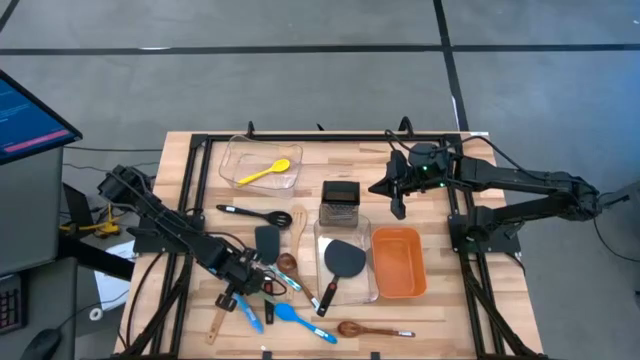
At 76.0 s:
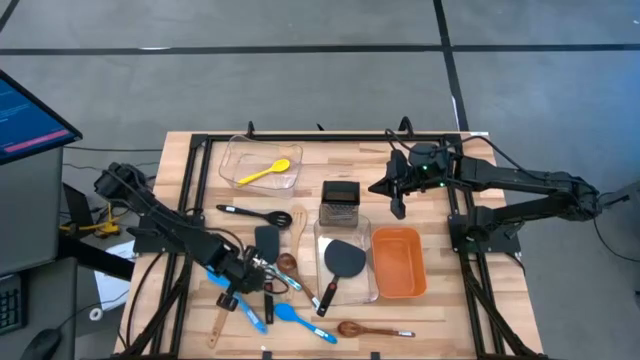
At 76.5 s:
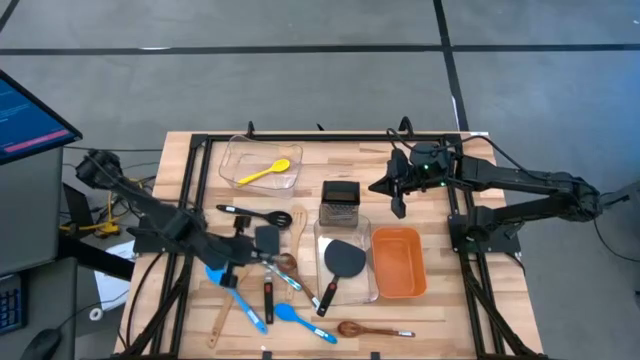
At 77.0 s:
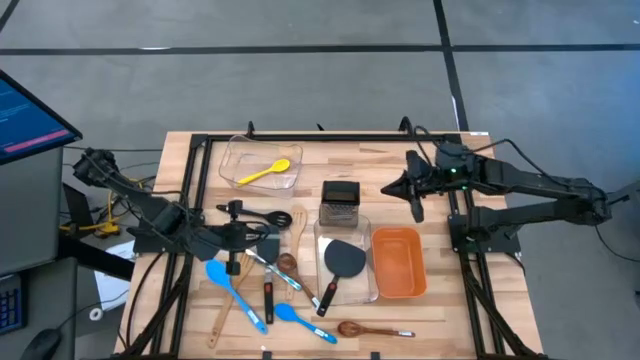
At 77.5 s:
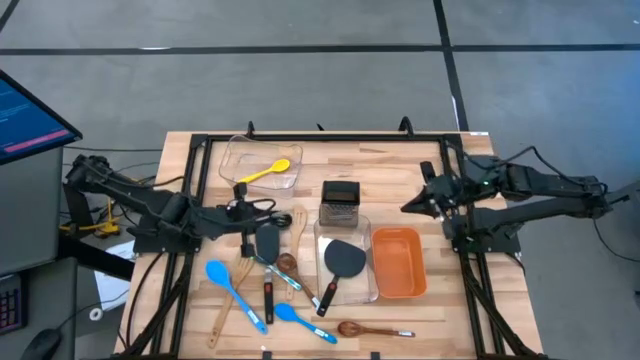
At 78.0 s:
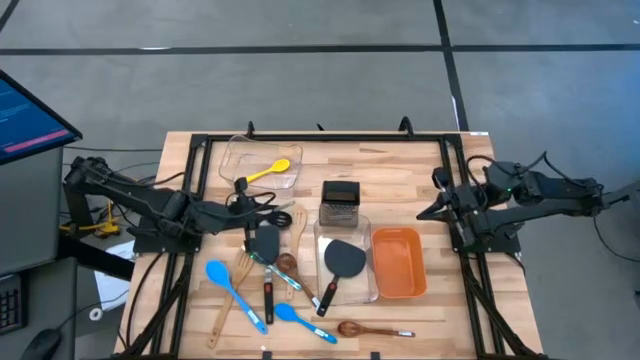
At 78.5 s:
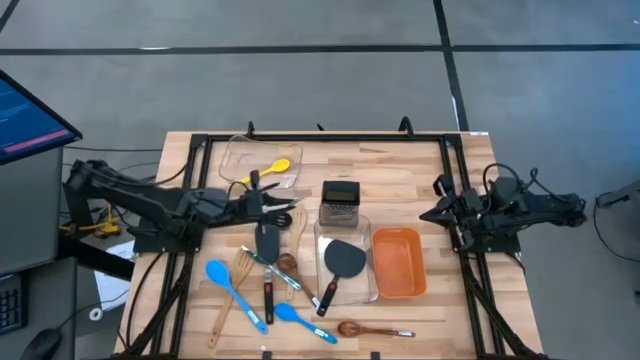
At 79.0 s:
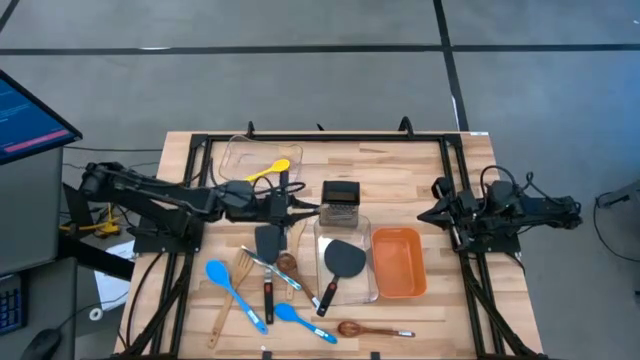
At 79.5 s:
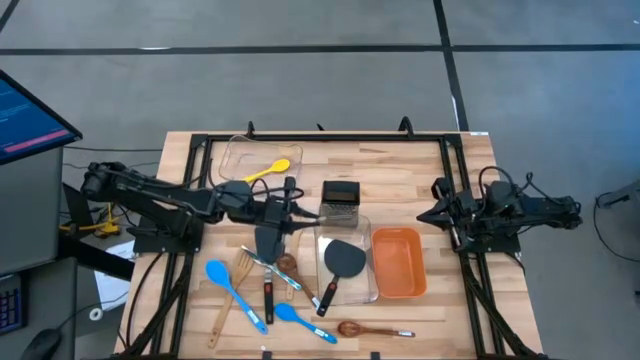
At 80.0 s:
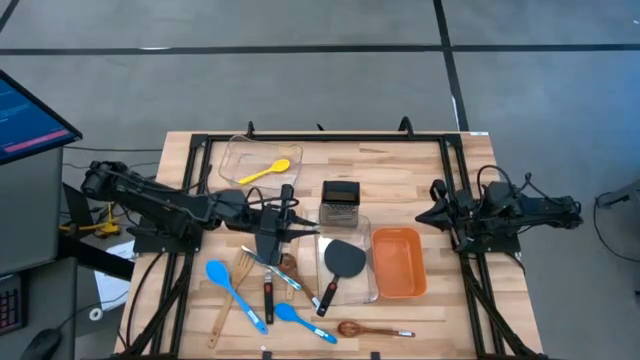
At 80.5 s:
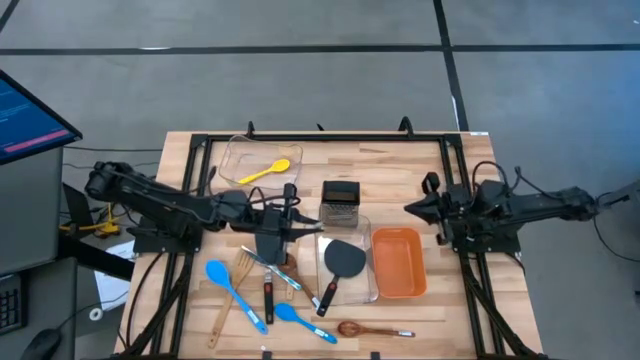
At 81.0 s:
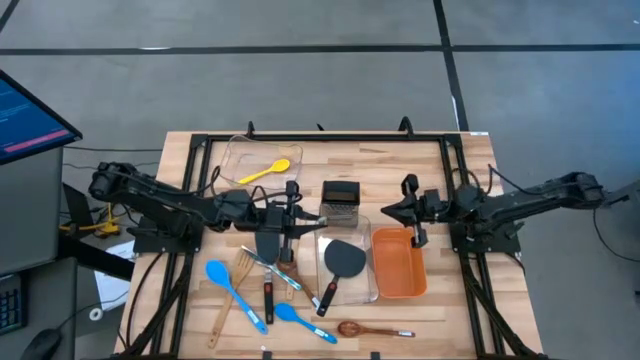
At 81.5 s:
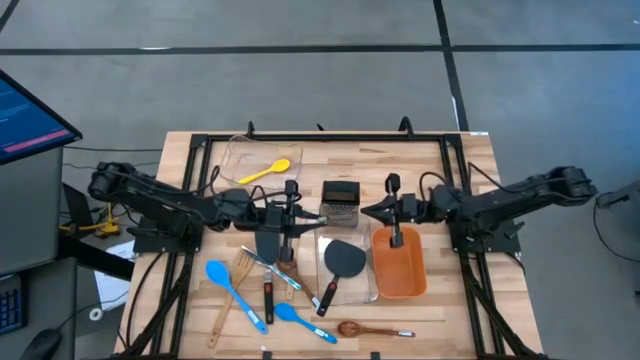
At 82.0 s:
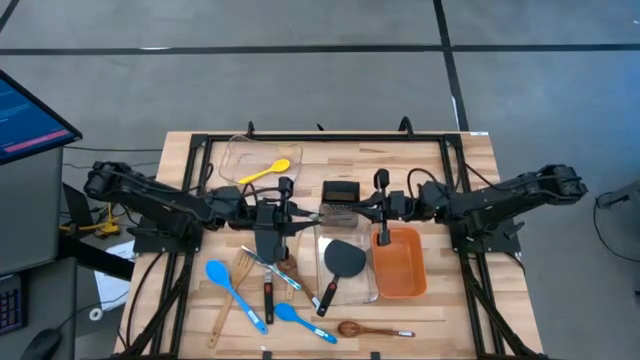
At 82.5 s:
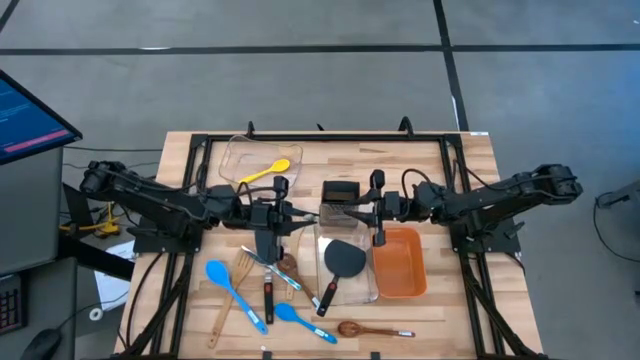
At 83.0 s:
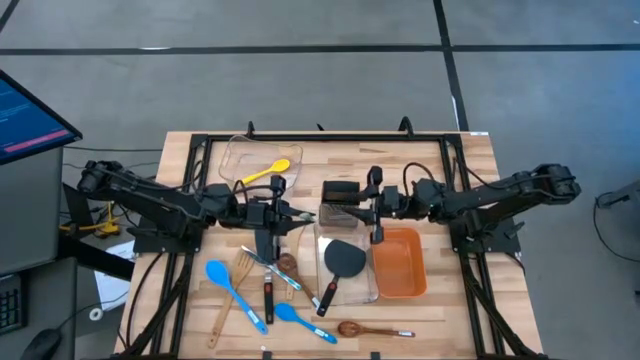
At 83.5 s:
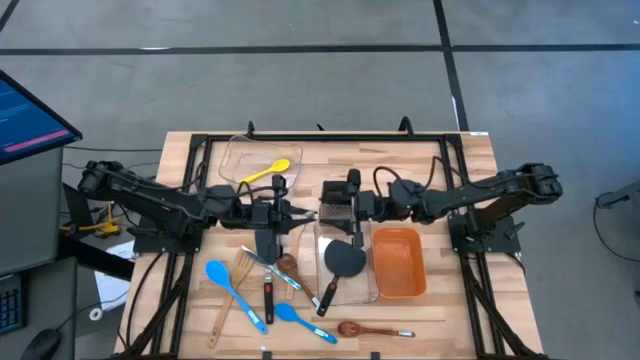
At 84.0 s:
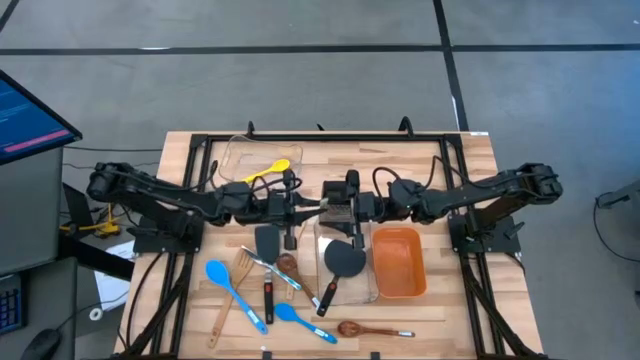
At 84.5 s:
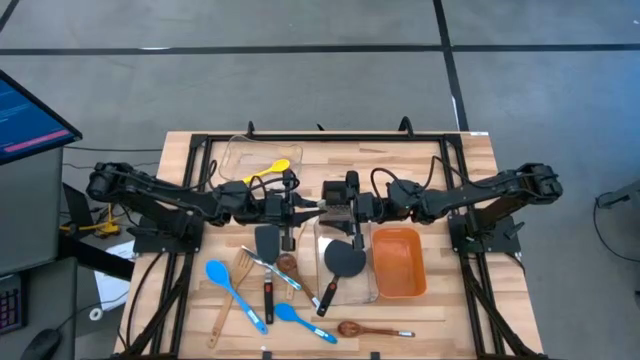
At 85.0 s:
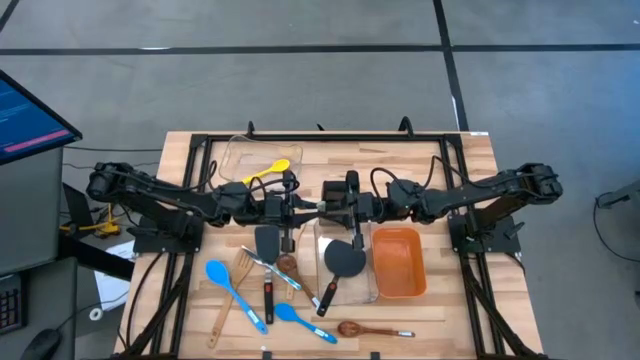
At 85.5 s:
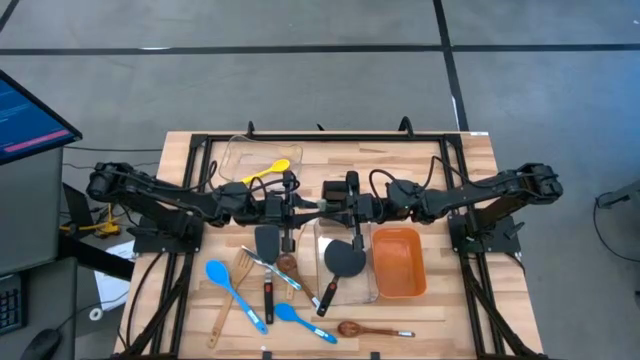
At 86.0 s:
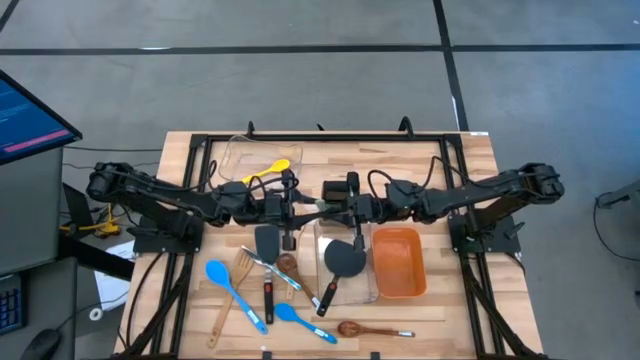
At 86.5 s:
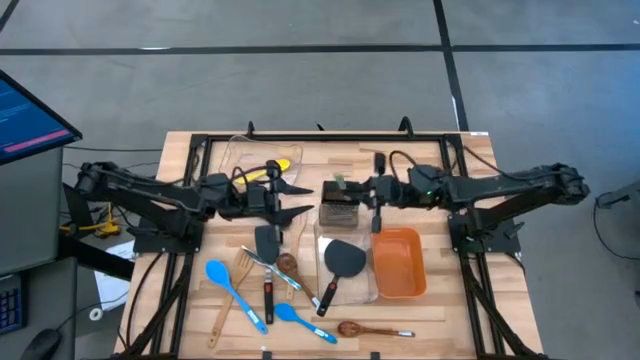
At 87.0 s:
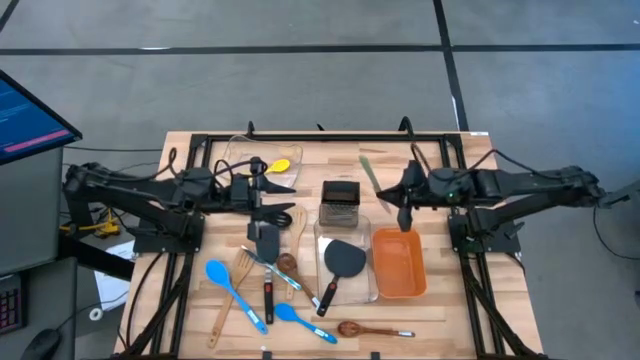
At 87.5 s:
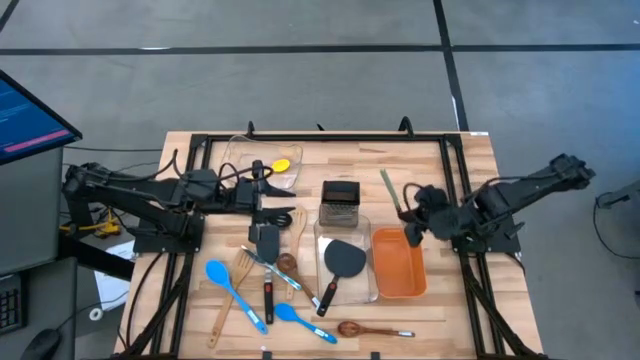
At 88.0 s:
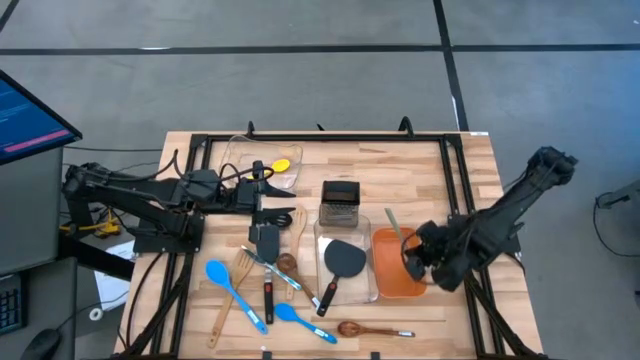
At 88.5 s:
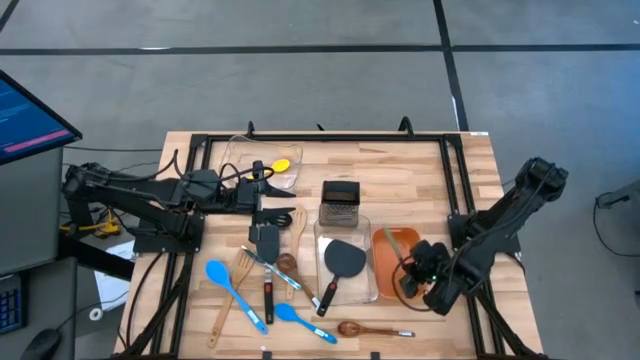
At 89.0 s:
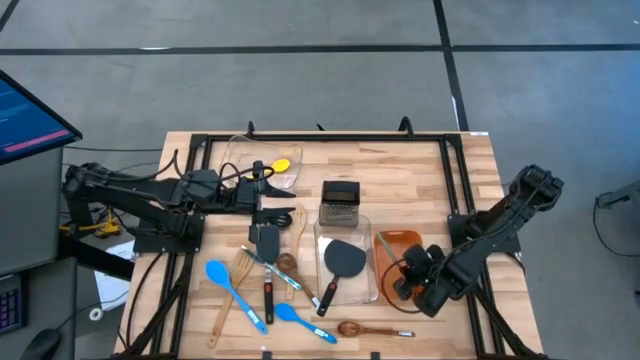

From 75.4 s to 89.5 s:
Task: Pick & Place Kitchen Items
Put the green knife into the orange bin

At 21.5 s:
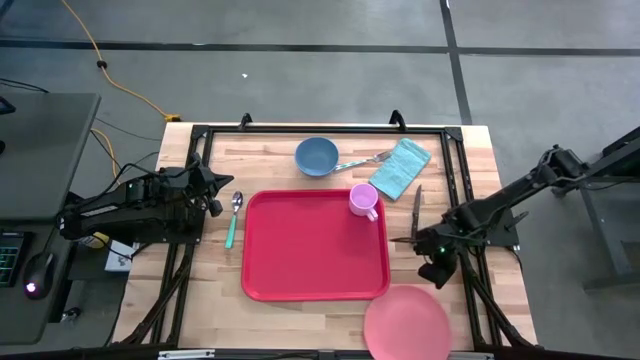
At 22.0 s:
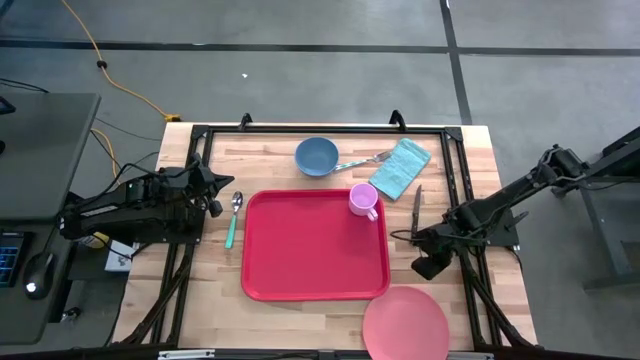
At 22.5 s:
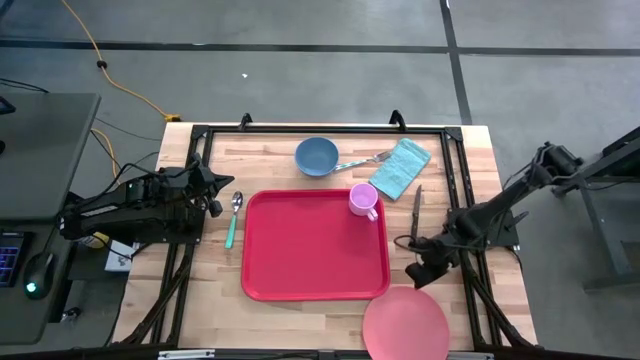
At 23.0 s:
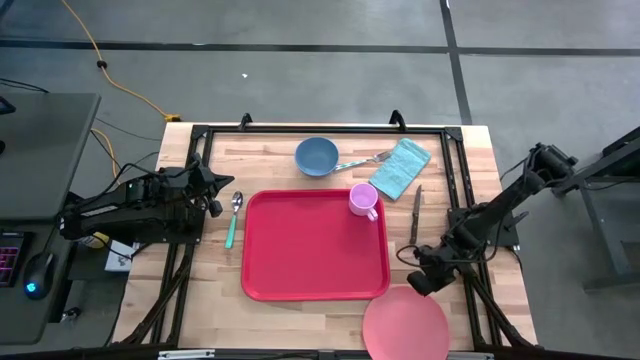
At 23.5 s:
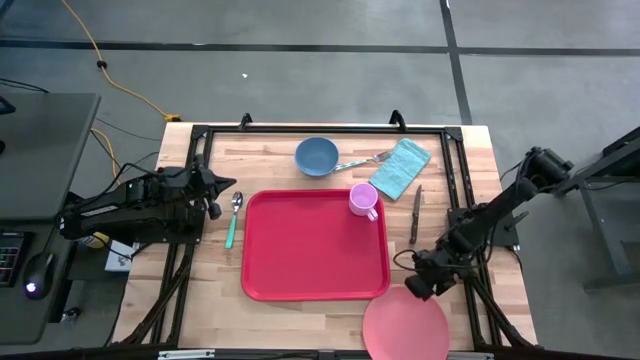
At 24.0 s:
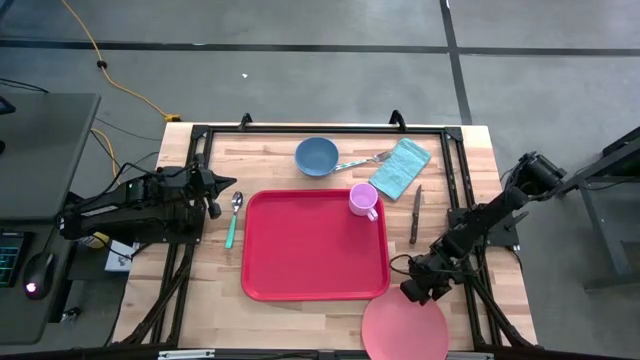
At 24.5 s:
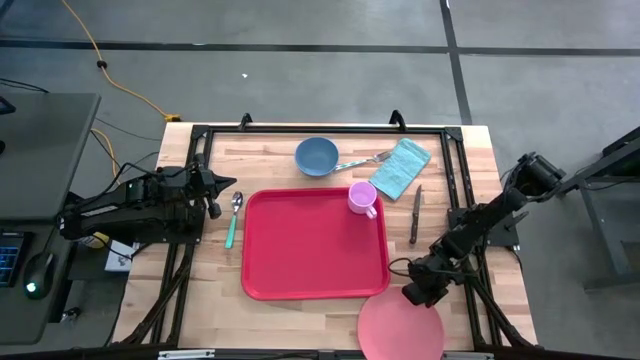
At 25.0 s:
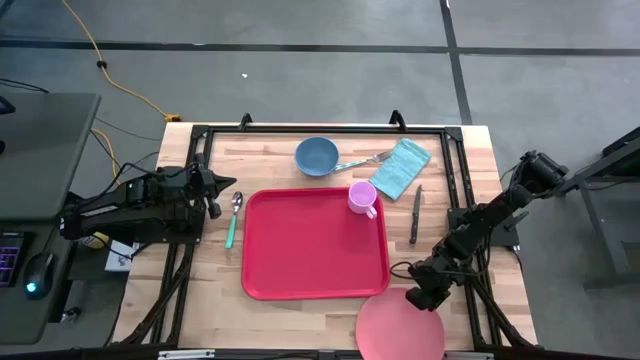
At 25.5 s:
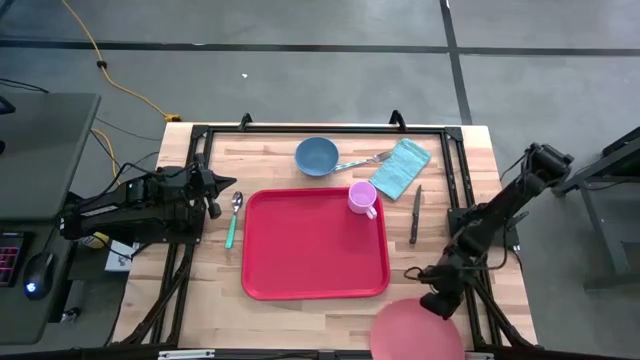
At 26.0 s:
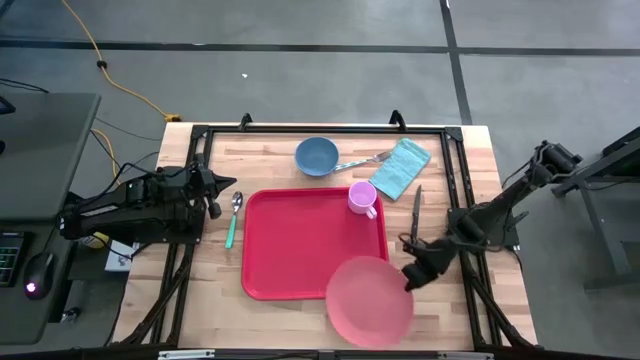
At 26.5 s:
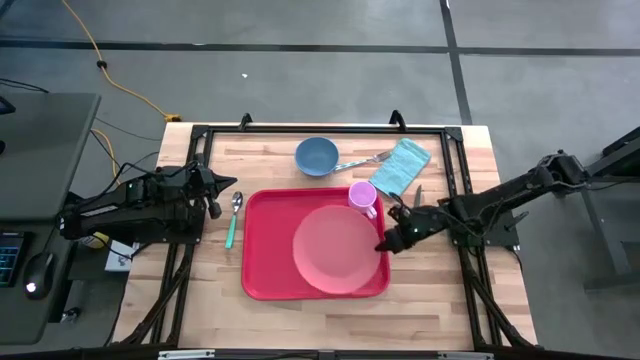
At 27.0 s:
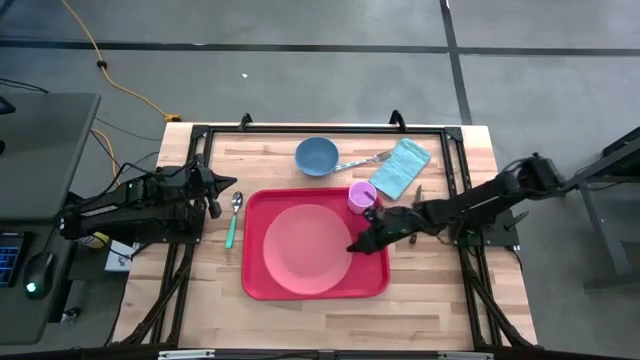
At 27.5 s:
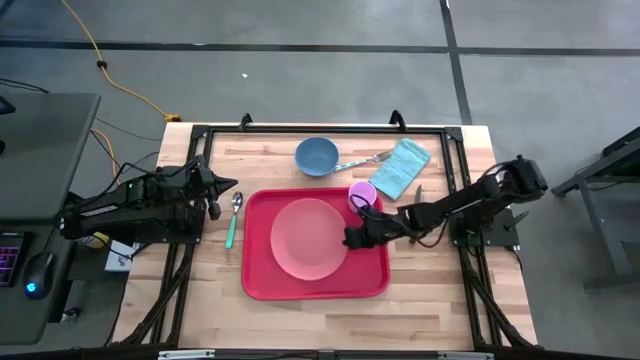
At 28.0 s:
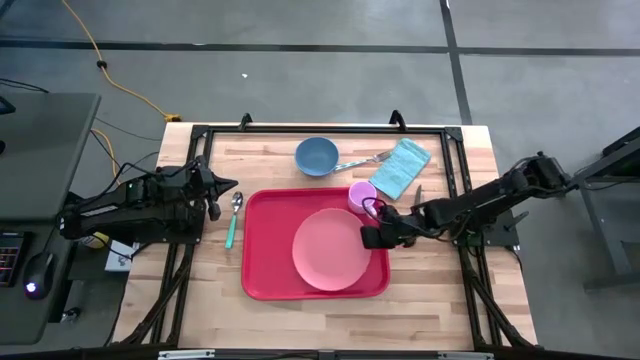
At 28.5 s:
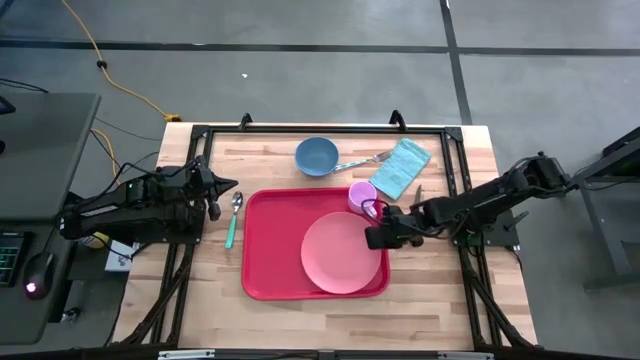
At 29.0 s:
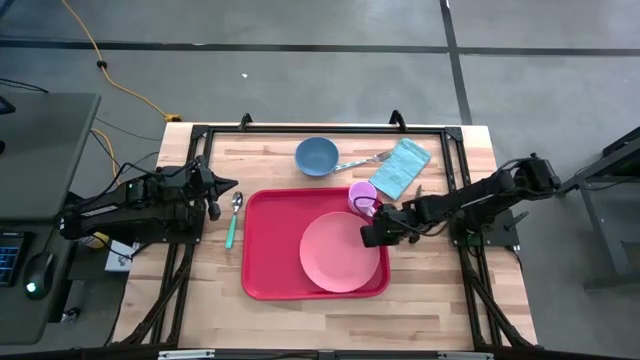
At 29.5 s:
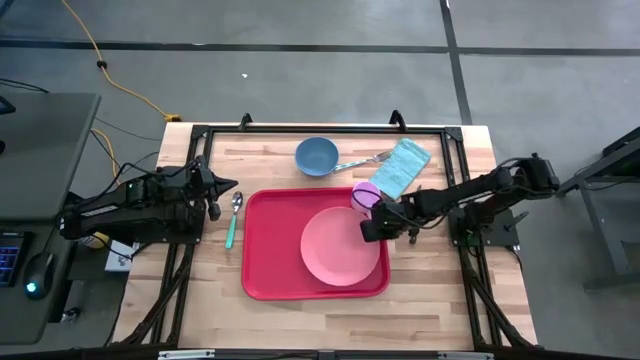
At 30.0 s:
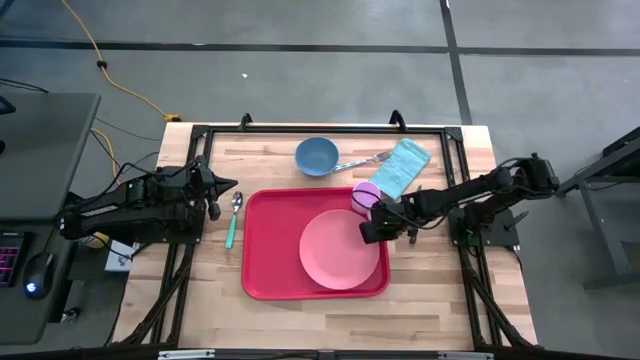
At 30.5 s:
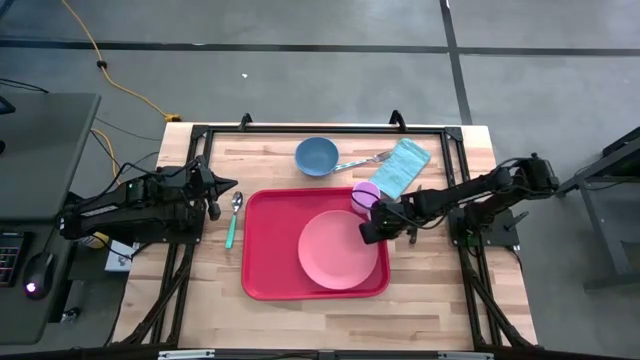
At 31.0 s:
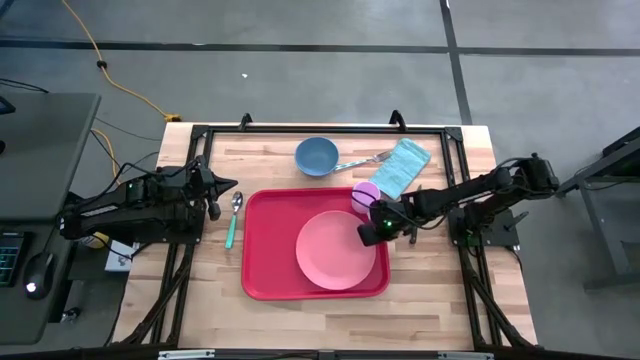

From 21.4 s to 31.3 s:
Task: Set up tray
Put the pink plate on the red serving tray below the purple coffee mug
